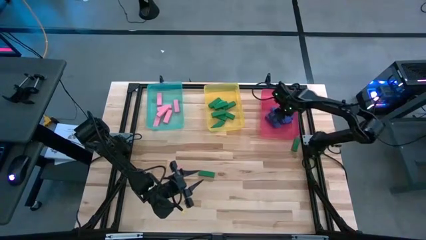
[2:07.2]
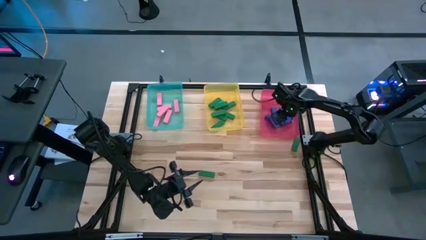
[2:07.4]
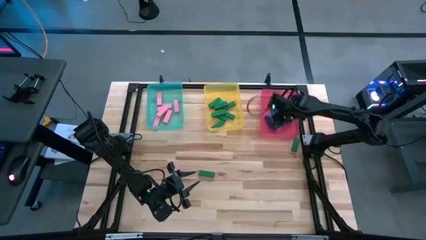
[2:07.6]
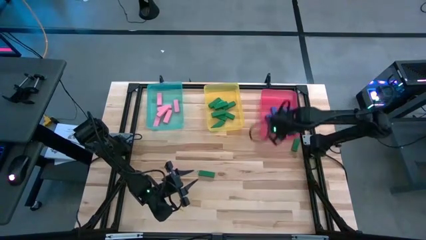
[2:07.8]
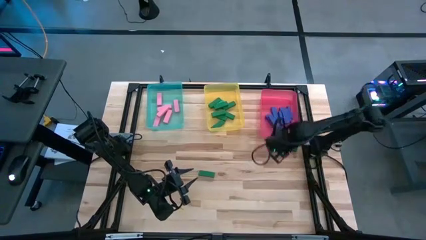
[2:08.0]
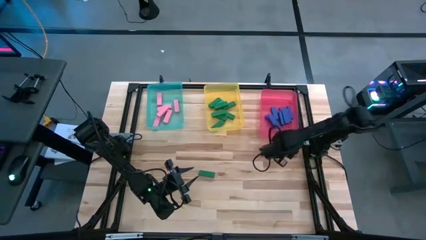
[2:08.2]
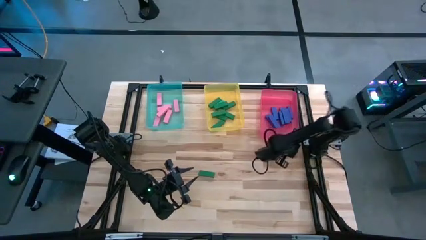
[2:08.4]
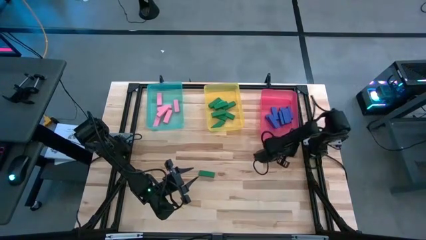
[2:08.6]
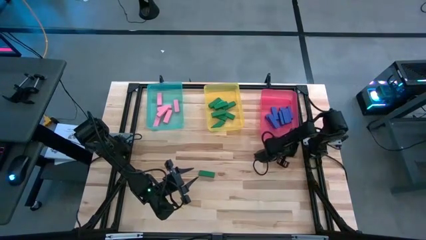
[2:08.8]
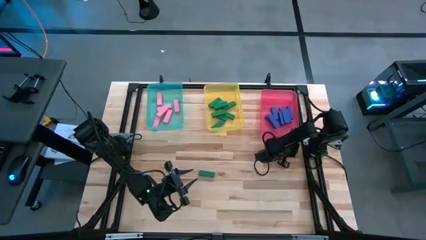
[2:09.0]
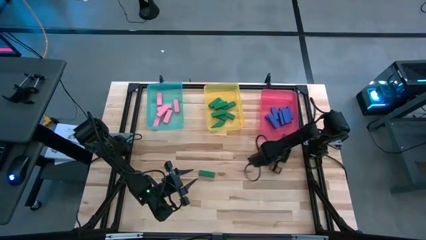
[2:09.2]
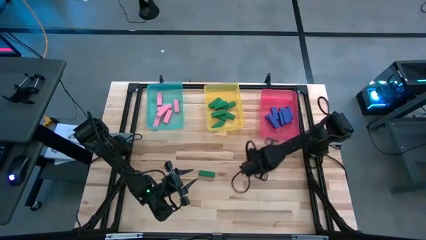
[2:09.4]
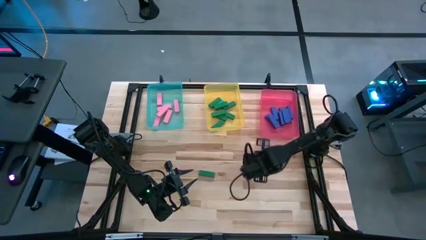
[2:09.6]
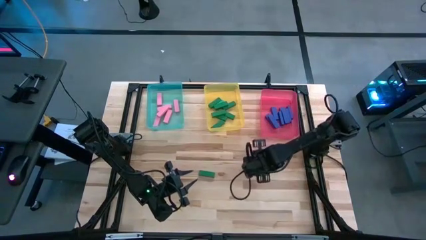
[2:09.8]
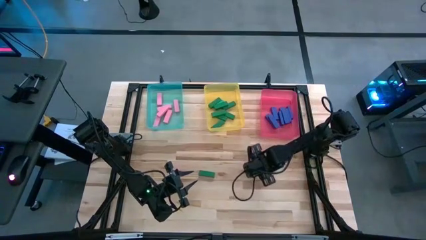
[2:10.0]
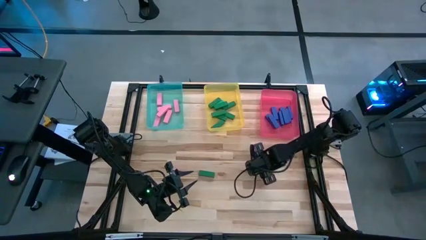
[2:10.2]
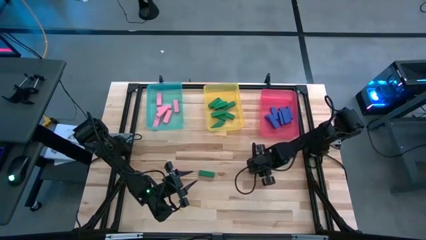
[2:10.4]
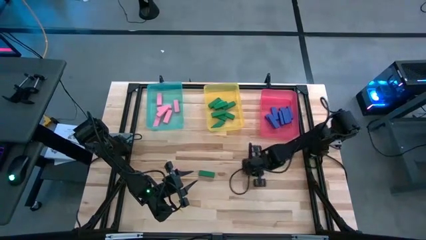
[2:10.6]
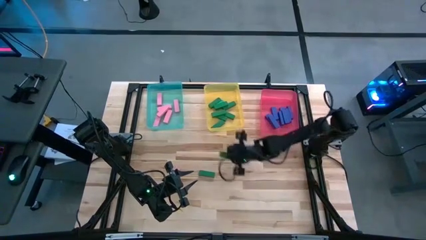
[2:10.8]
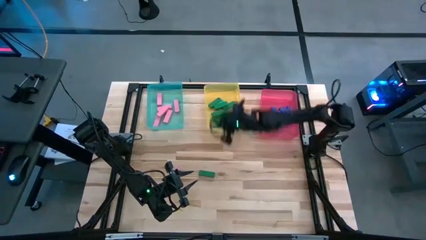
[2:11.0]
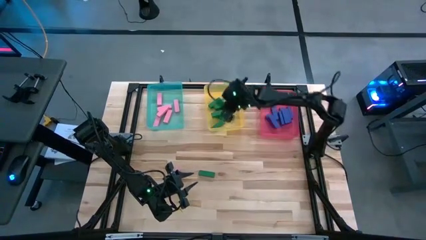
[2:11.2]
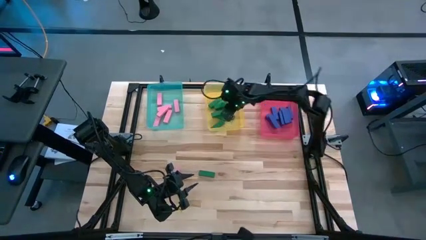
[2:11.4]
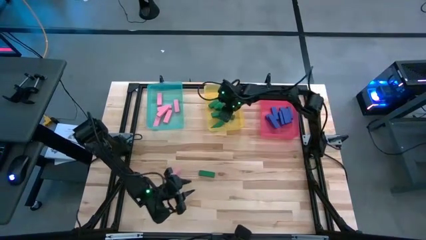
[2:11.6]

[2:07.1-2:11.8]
Task: Sort blocks
Put the green wooden block into the yellow bin

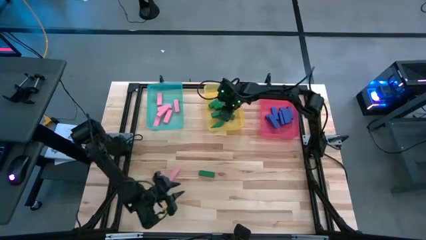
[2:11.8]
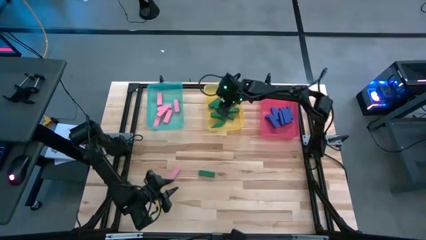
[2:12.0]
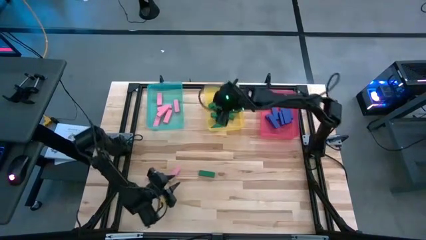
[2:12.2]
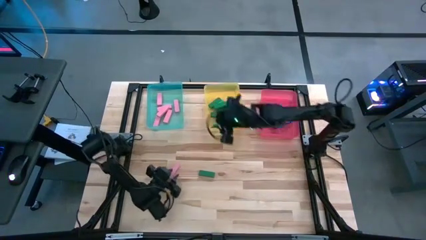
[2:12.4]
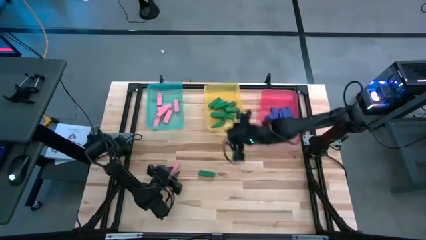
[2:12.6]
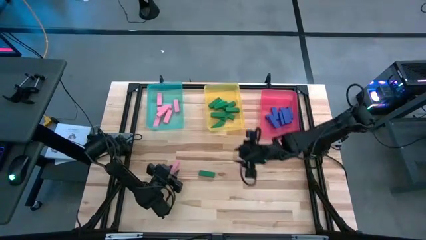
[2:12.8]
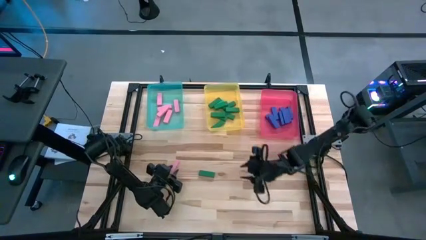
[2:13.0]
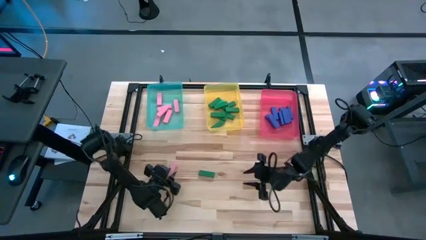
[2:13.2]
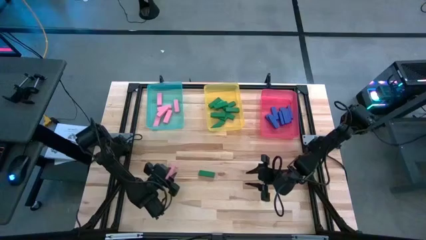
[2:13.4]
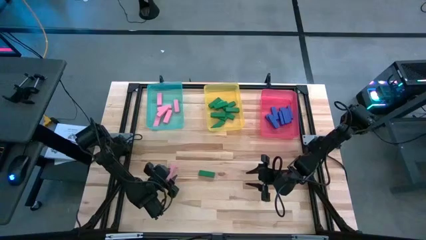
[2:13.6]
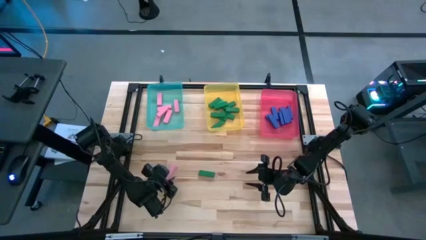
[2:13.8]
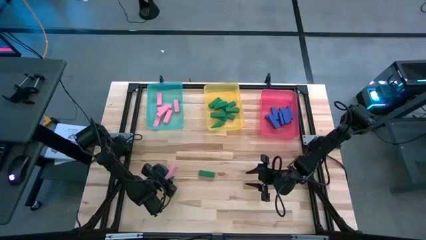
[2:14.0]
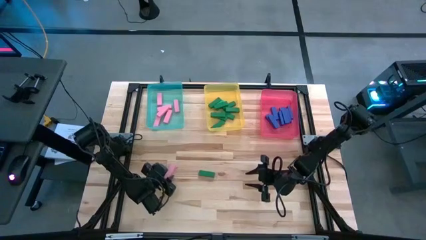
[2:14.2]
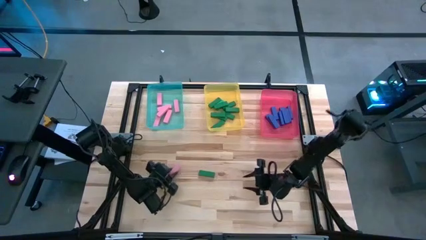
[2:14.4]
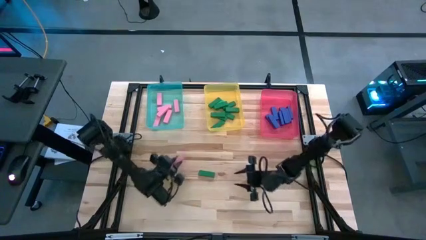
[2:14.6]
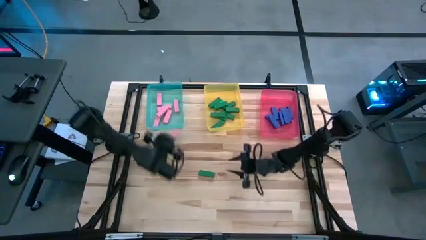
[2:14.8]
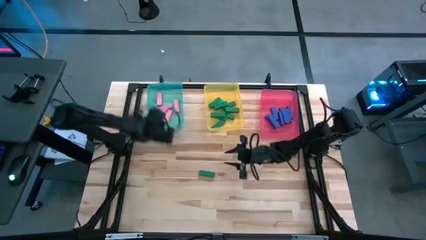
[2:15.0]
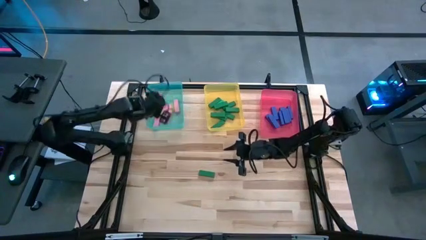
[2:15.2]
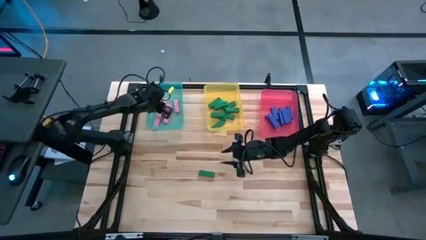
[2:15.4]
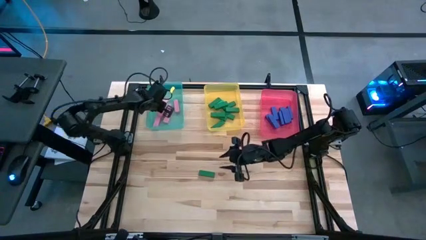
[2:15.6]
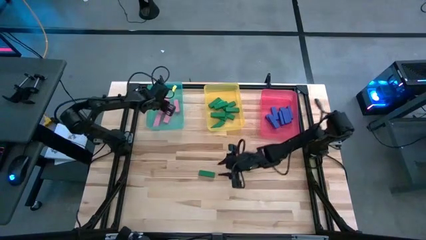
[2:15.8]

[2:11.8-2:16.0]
Put the pink wooden block into the blue bin

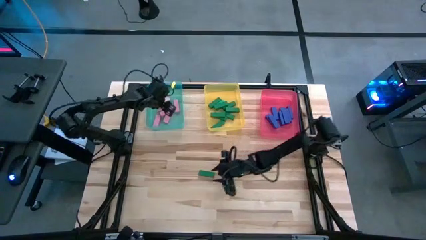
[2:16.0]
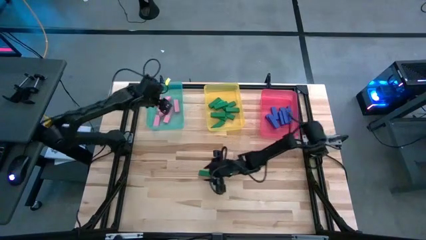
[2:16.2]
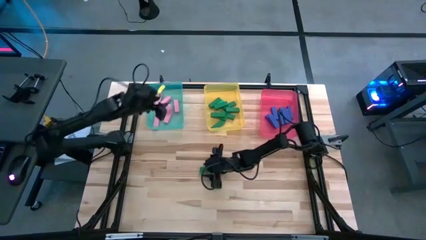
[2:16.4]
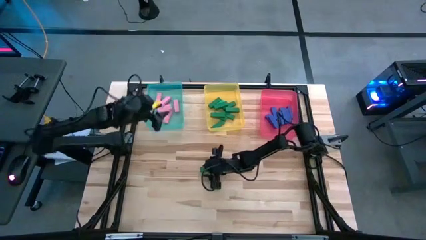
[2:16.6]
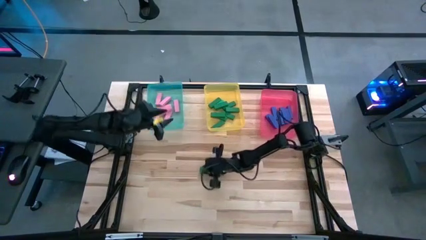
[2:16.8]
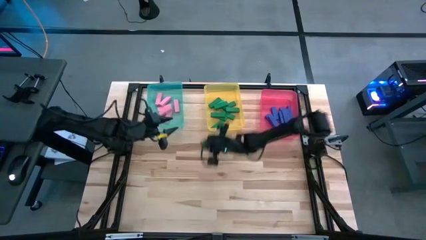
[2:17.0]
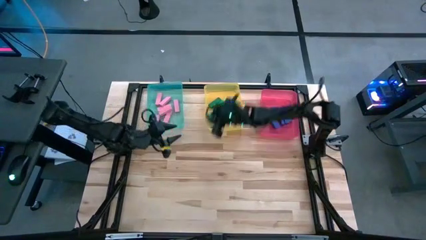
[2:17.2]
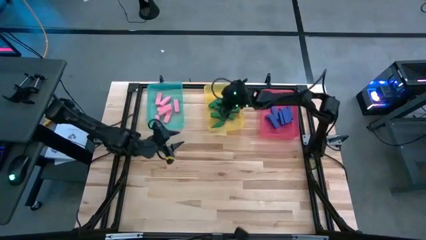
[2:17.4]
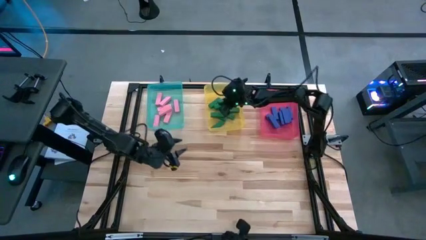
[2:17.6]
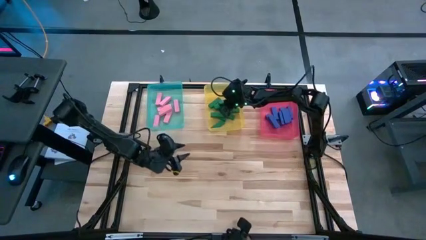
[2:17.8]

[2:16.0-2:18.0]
Put the green wooden block into the yellow bin

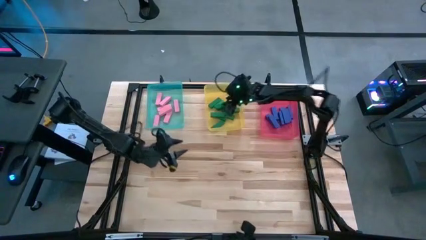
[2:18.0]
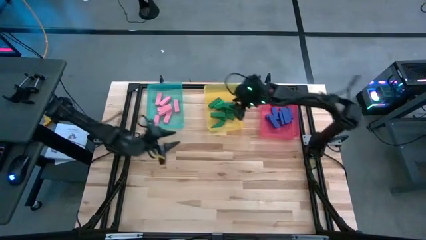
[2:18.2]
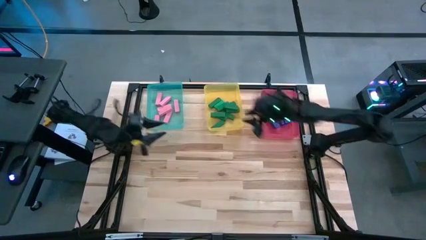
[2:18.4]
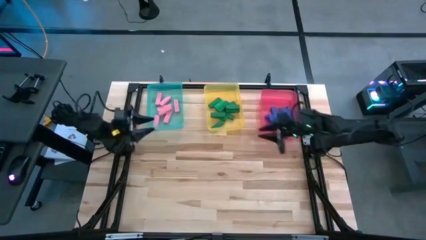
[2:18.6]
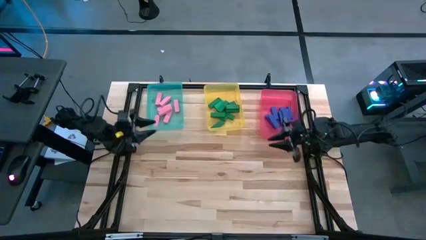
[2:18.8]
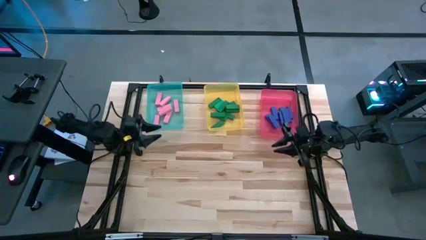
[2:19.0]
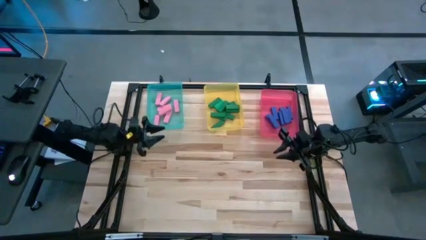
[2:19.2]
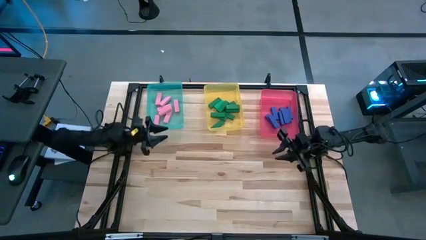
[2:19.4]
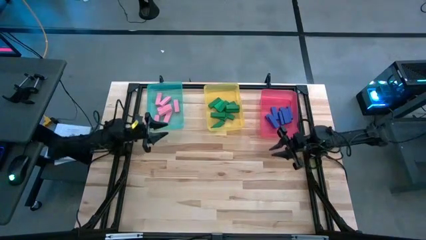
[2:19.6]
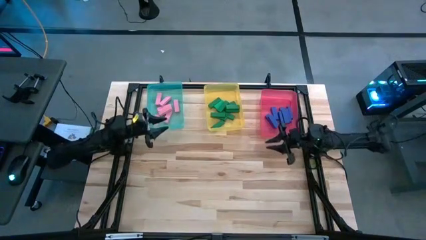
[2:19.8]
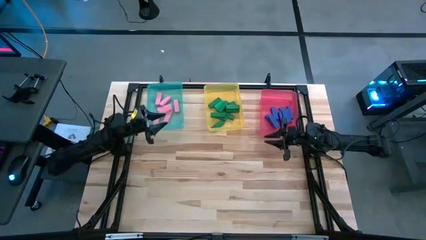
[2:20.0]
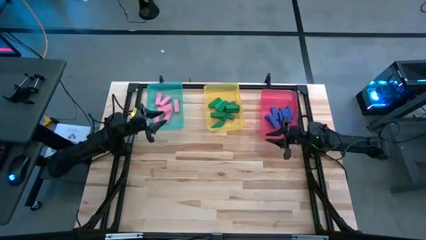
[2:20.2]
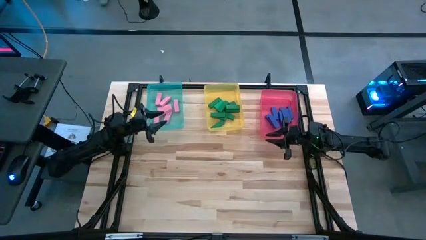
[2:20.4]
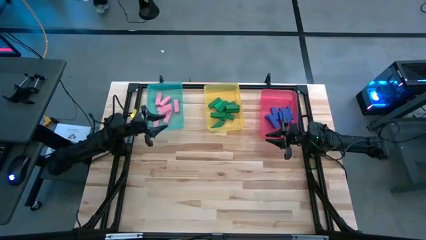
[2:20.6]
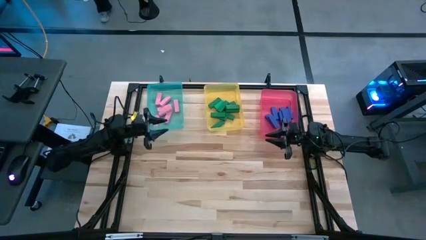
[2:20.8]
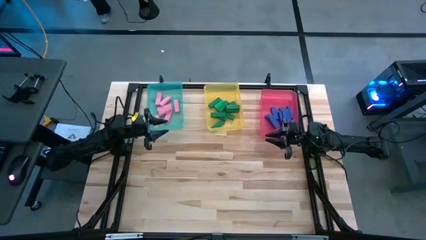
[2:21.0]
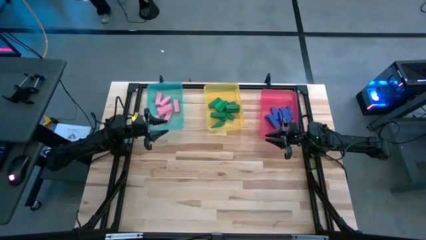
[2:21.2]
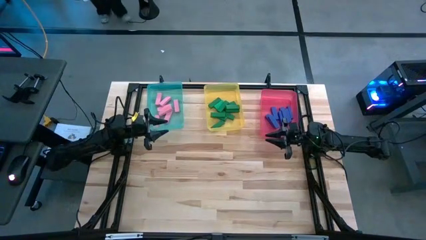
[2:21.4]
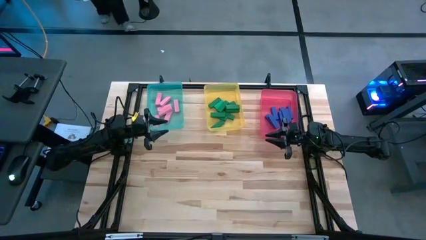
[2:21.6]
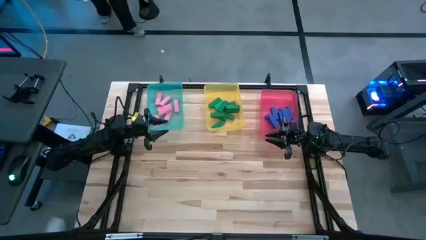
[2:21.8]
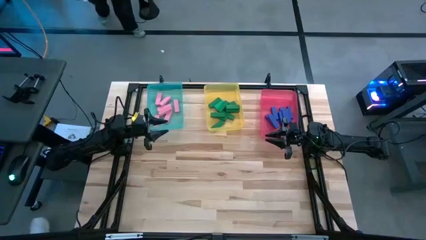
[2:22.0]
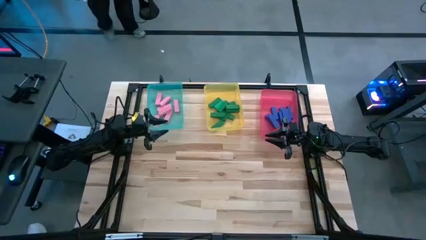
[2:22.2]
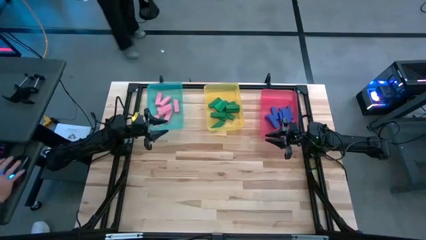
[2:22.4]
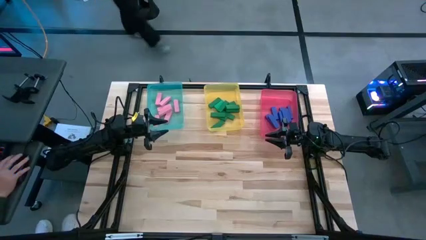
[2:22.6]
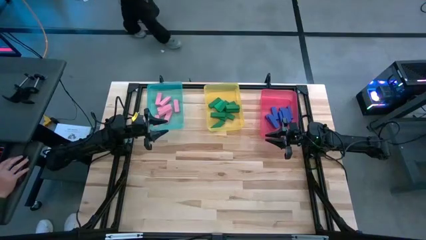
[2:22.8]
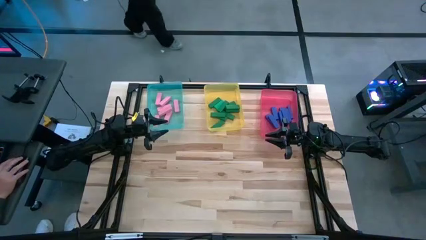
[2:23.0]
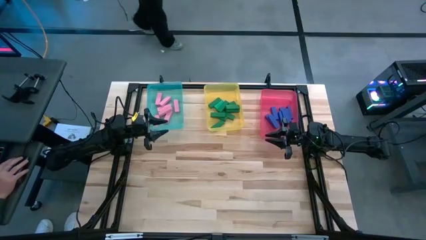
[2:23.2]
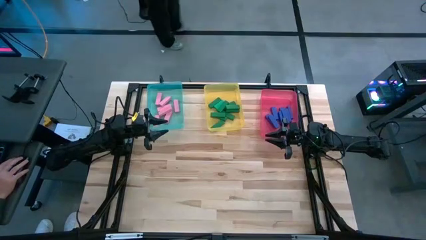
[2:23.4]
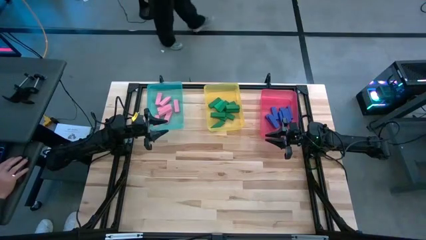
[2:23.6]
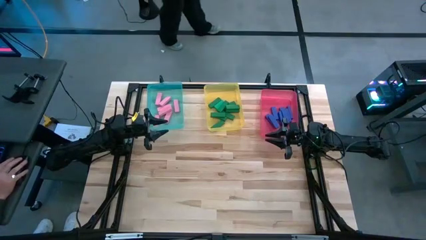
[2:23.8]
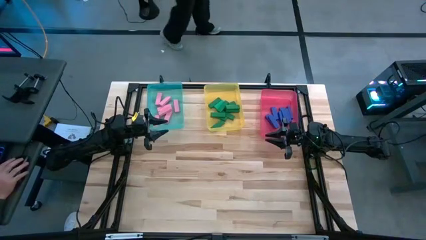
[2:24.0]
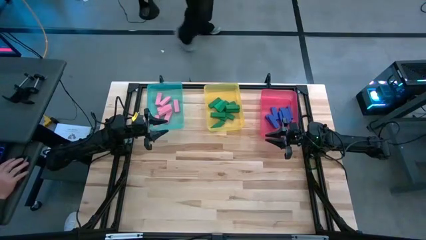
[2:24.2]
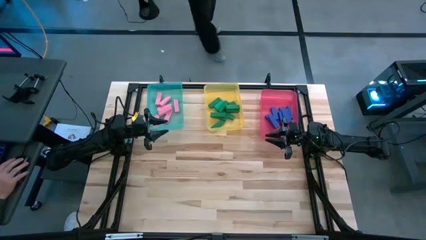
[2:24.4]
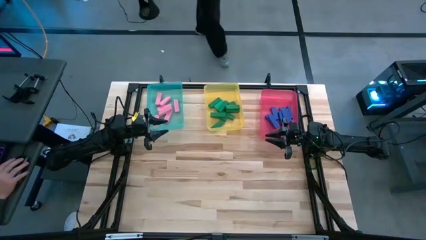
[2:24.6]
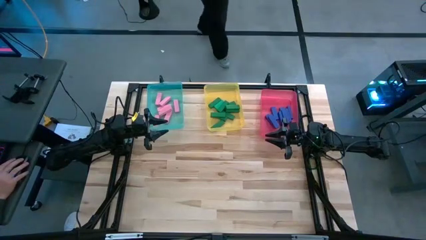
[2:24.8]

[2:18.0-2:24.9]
Return to Home Position
